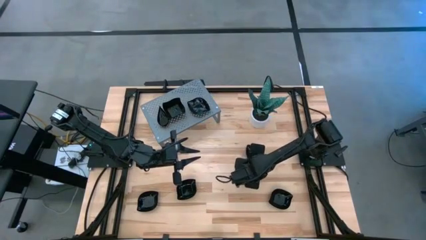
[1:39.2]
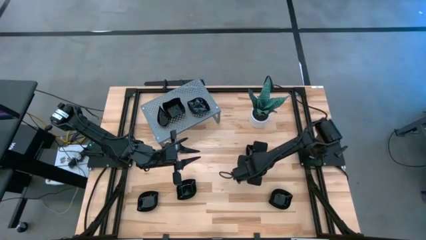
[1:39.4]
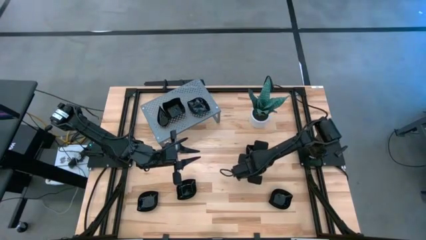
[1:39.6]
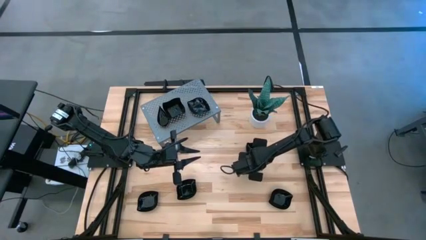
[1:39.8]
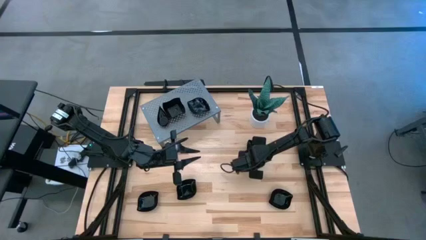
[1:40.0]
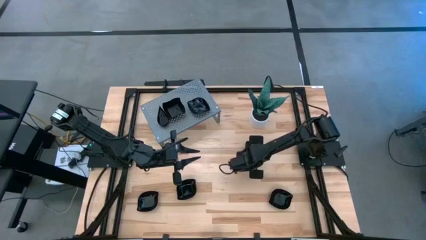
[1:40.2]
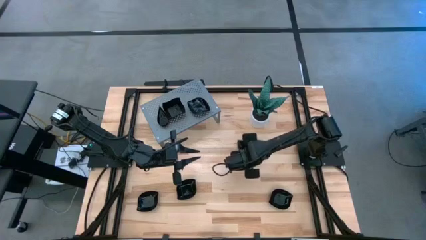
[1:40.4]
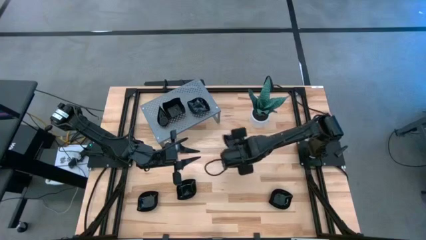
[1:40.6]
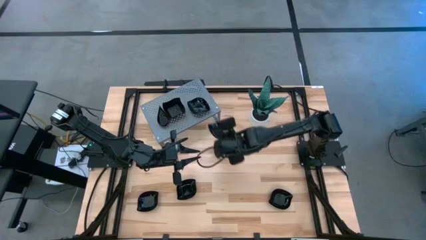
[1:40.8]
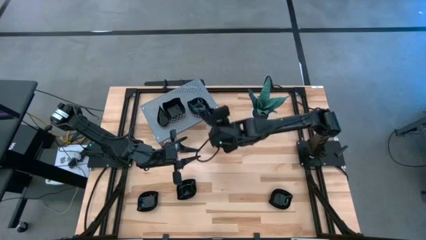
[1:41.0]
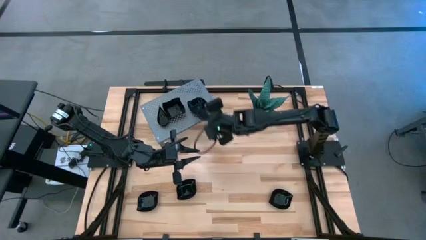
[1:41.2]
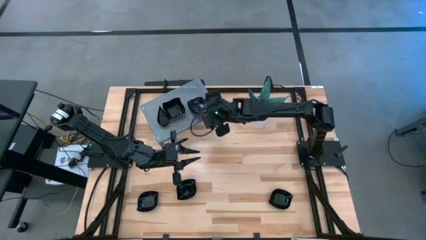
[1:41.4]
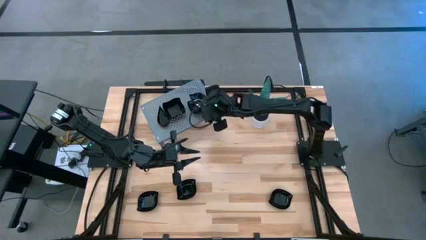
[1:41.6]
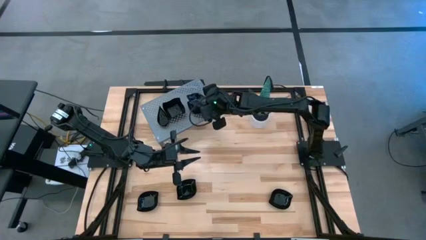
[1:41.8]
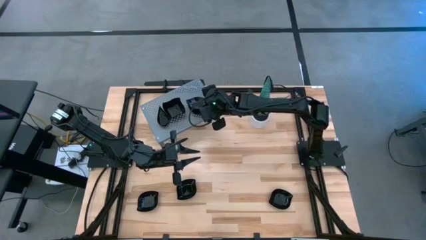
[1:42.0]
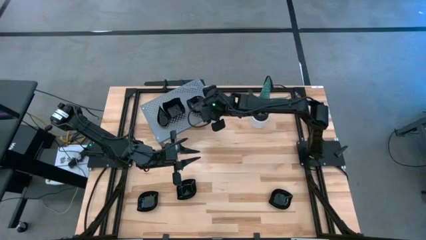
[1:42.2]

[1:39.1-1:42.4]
Task: Pick & Place Mini shaped plates
Stack the black leaf-shaped plate on the black leaf-shaped plate on the shelf

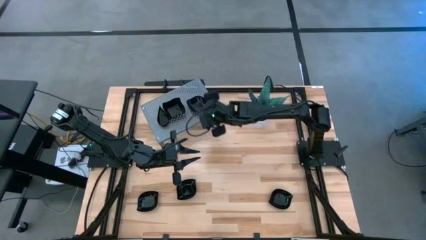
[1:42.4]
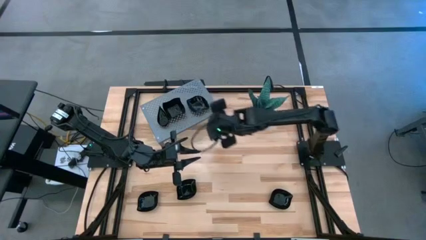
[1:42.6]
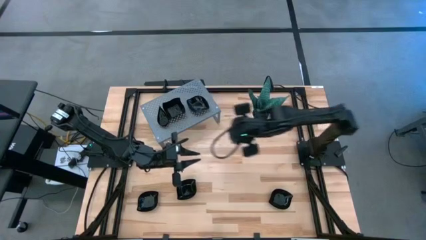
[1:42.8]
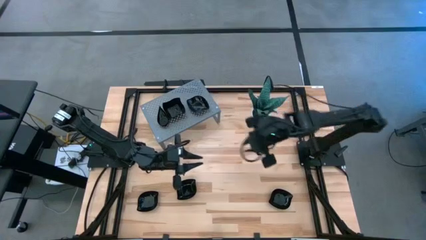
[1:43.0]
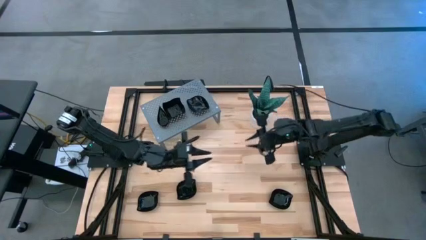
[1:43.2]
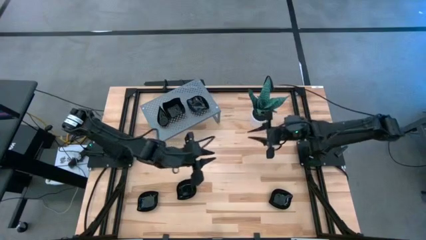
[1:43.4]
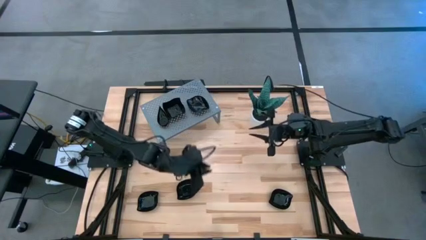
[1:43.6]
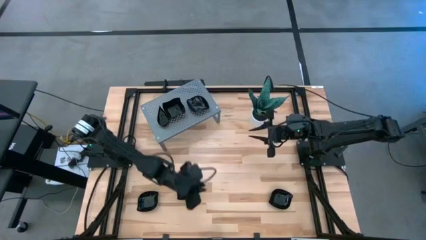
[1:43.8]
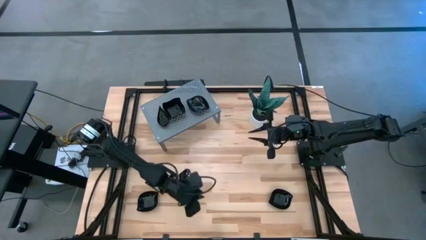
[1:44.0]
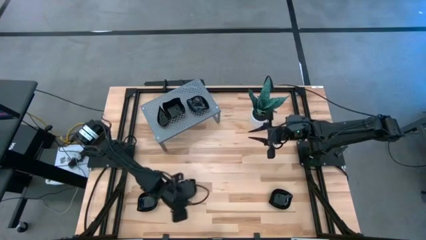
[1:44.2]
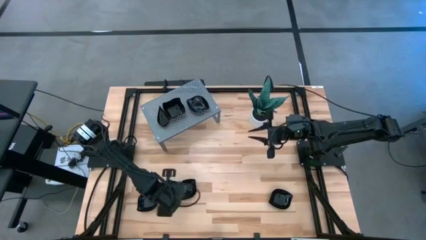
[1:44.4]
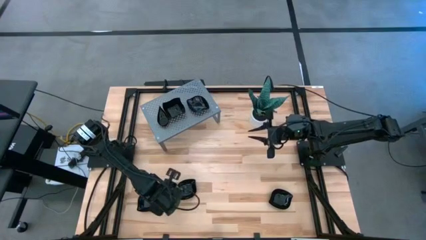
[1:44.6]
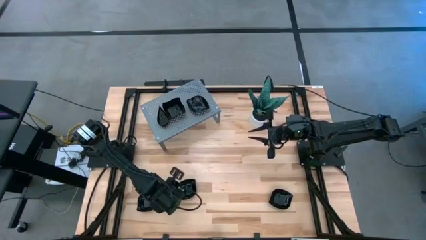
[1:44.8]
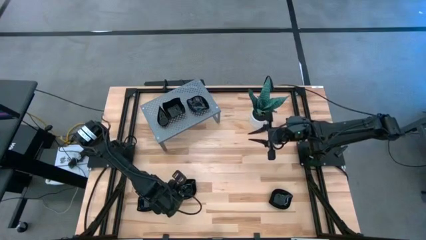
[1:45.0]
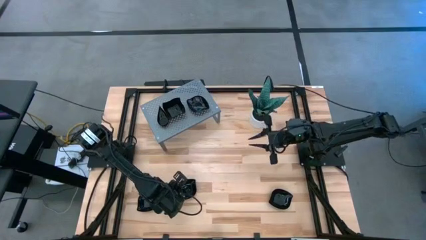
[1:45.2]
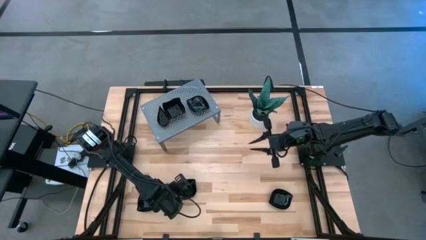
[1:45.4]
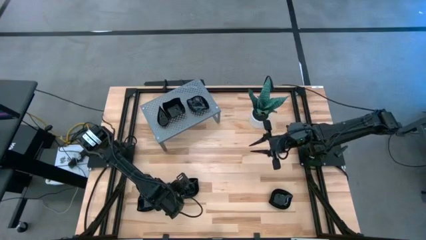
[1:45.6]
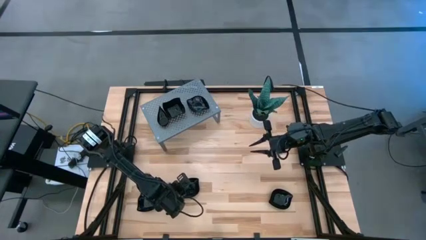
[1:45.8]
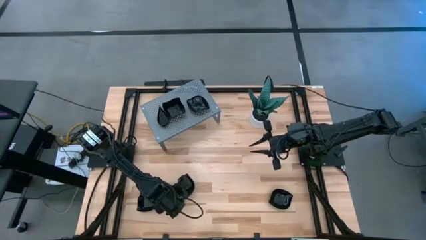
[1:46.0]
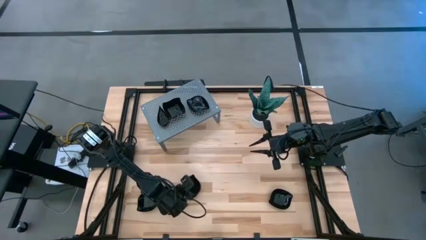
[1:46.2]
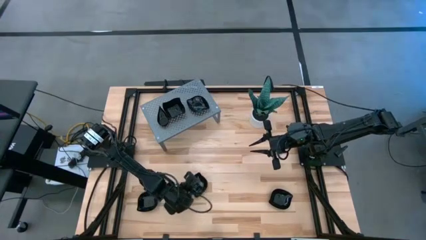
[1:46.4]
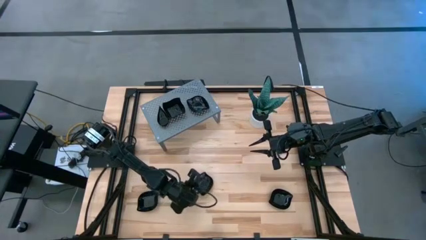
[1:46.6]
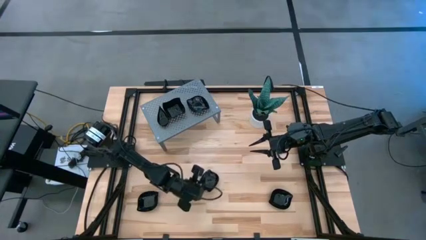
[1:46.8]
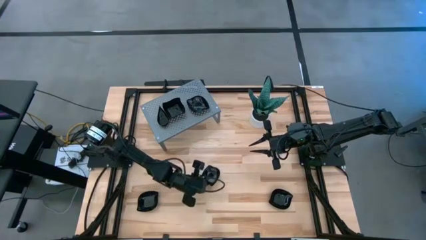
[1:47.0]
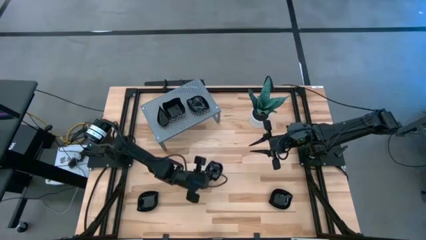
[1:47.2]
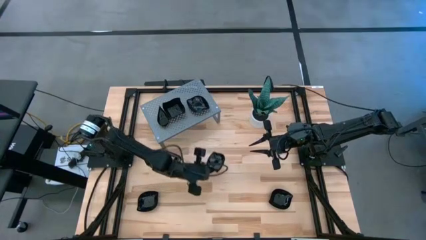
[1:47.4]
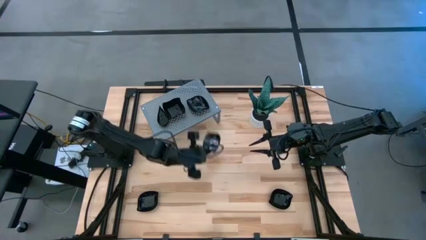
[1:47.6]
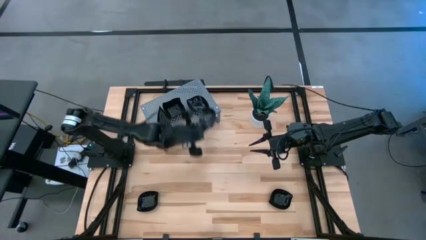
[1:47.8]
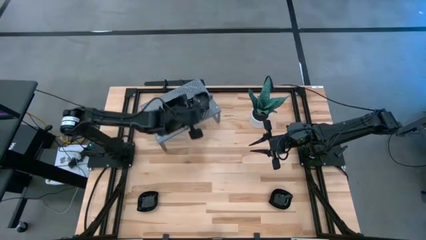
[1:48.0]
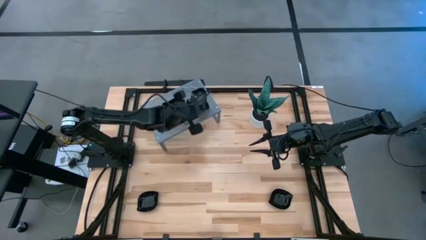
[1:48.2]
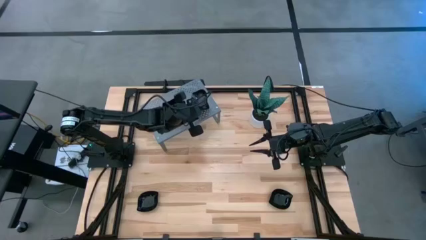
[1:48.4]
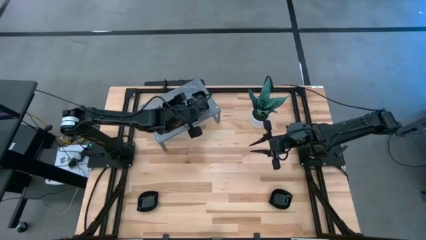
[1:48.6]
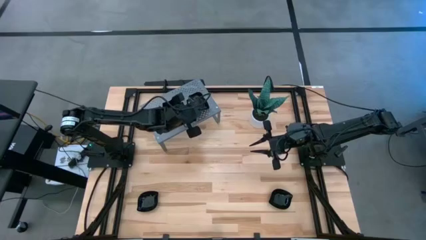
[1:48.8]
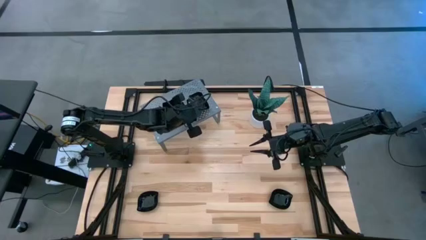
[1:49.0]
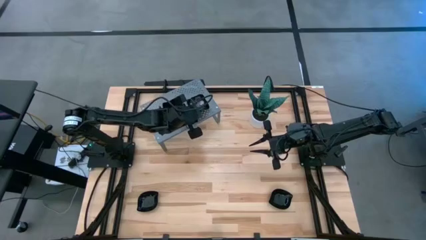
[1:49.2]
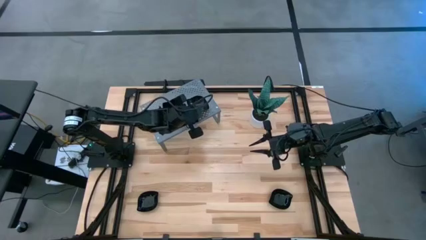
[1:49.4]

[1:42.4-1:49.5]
Stack the black leaf-shaped plate on the black leaf-shaped plate on the shelf

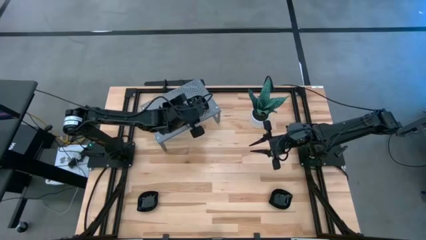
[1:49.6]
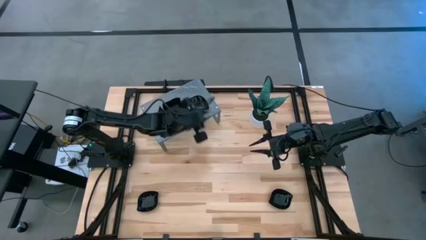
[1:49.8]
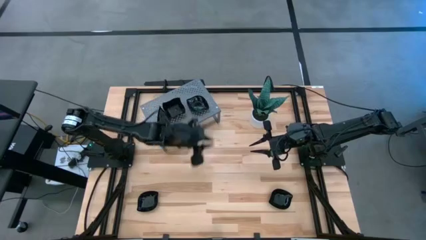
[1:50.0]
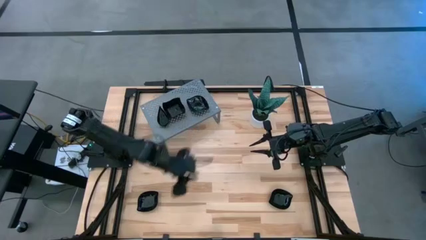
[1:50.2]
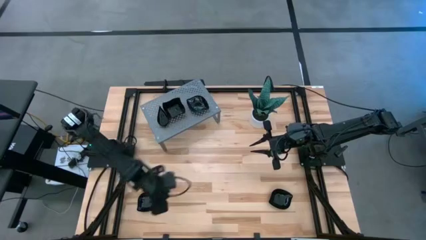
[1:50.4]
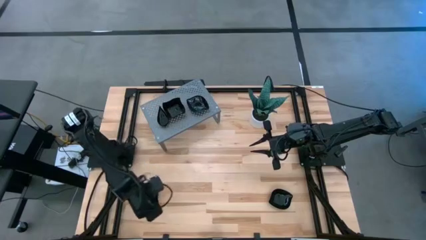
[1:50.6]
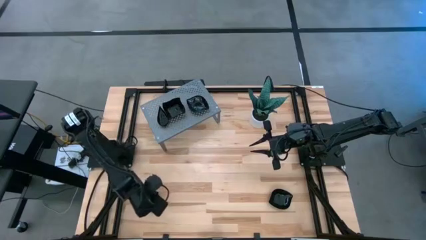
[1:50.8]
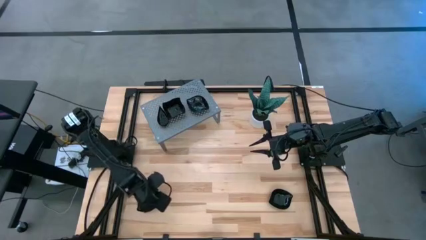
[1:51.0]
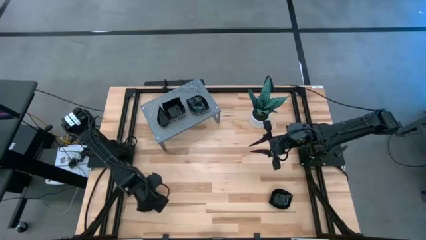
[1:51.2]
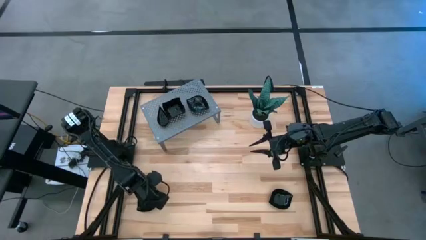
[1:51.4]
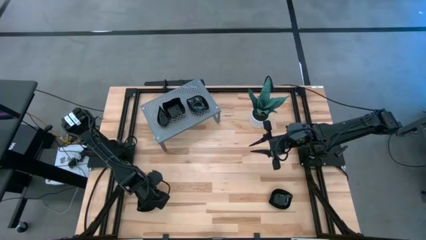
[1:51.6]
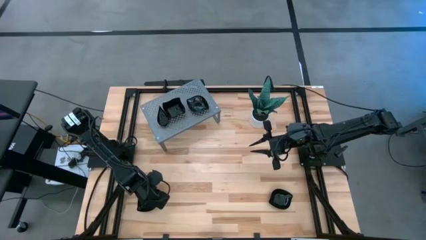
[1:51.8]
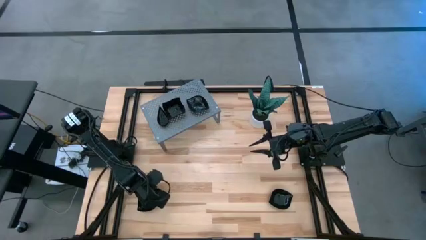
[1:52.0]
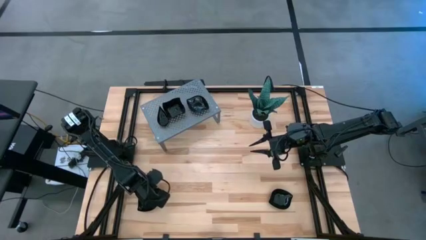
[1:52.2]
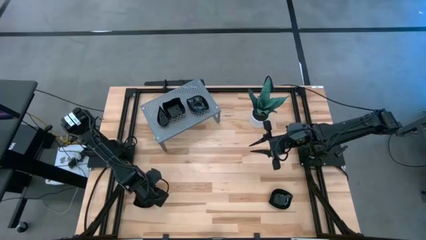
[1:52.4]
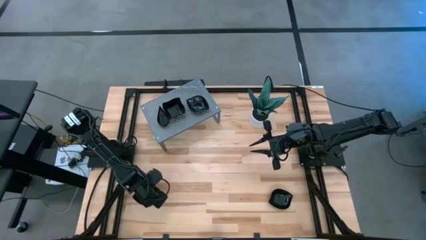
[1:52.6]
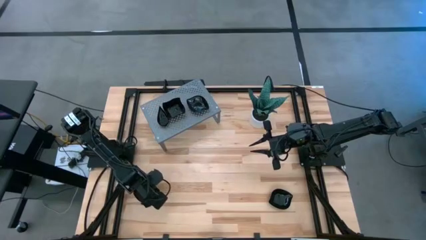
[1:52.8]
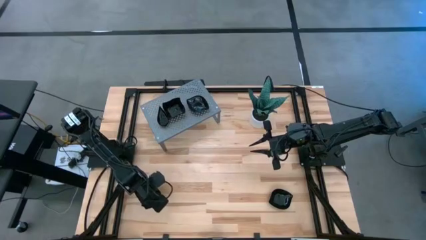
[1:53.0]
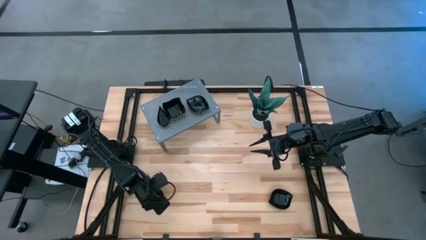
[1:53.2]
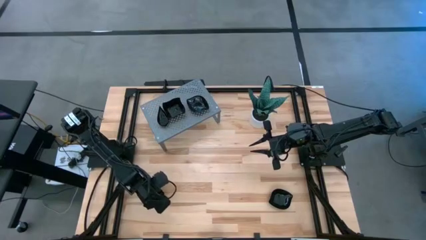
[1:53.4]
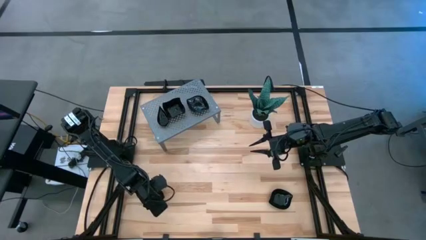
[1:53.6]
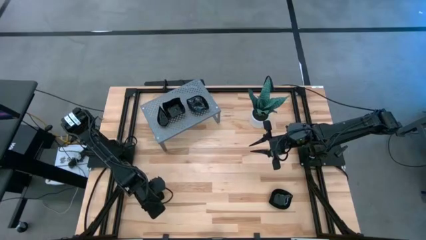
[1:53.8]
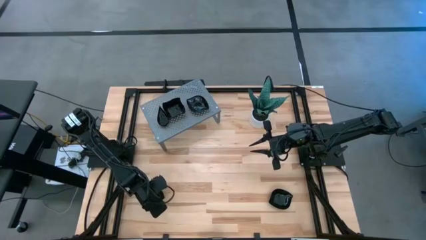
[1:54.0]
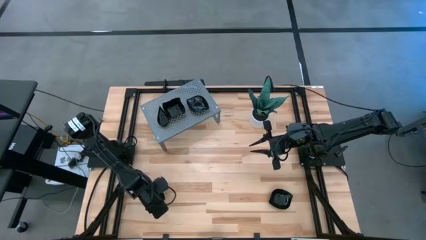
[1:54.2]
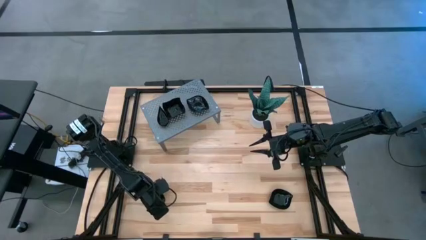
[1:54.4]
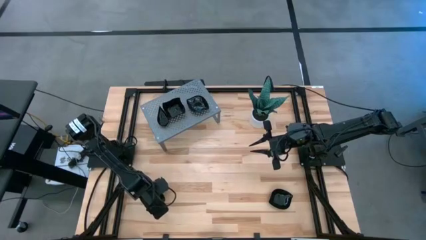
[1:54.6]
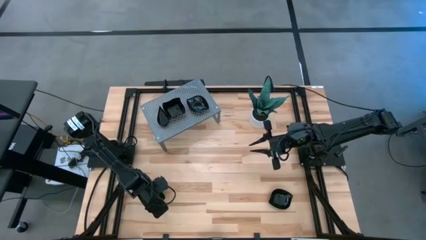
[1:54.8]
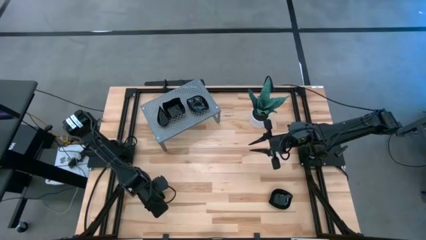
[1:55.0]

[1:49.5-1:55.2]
Stack the black leaf-shaped plate on the black leaf-shaped plate on the shelf
